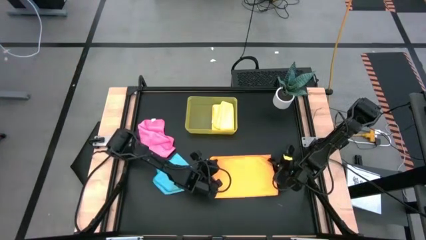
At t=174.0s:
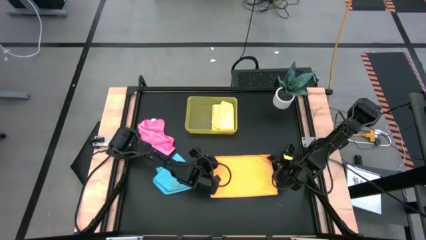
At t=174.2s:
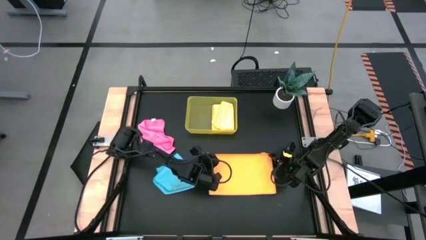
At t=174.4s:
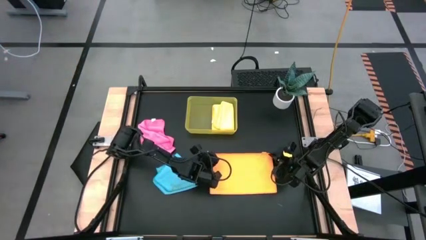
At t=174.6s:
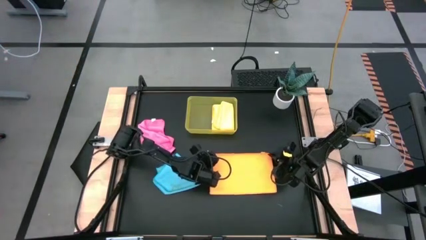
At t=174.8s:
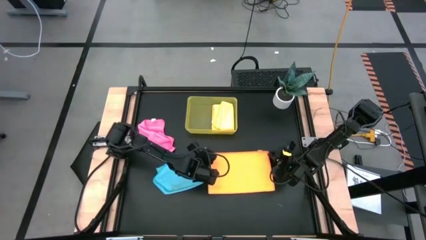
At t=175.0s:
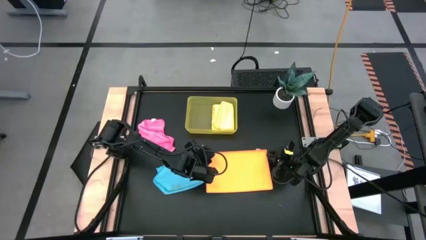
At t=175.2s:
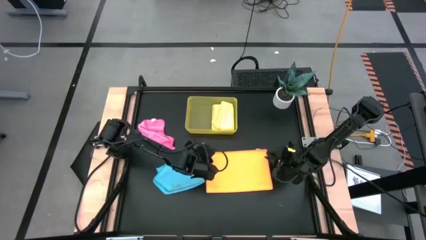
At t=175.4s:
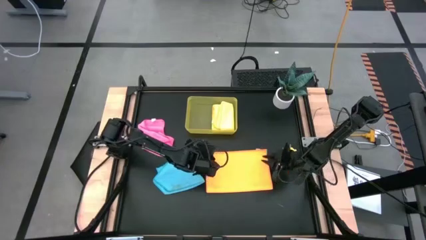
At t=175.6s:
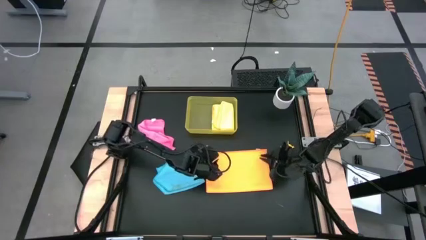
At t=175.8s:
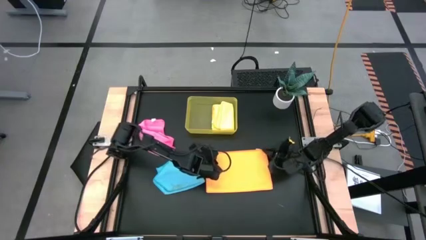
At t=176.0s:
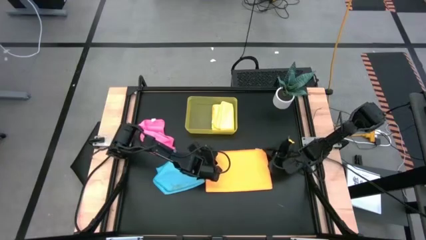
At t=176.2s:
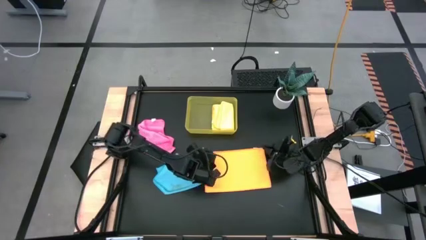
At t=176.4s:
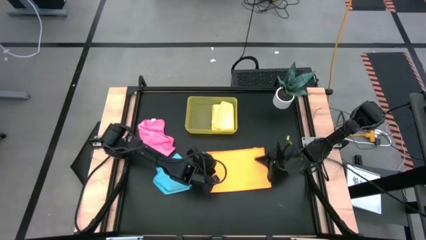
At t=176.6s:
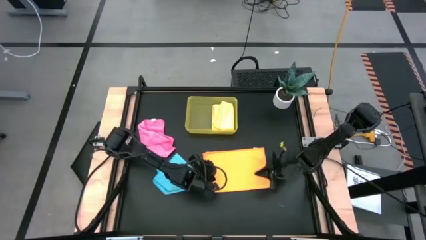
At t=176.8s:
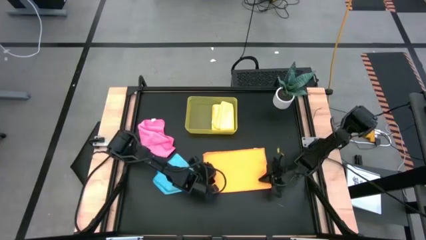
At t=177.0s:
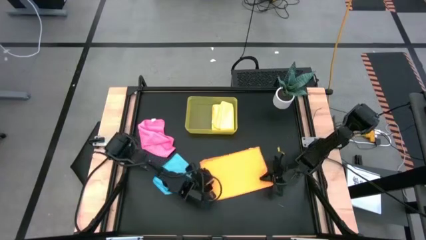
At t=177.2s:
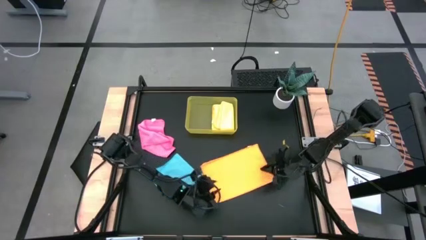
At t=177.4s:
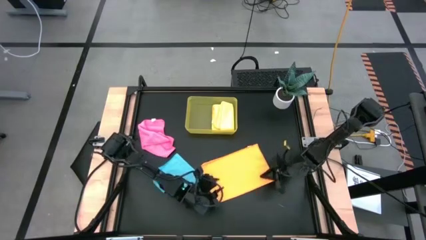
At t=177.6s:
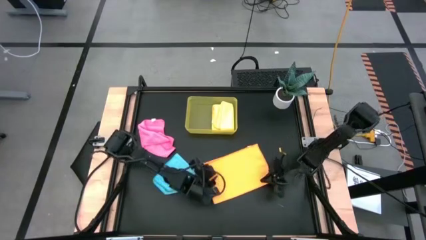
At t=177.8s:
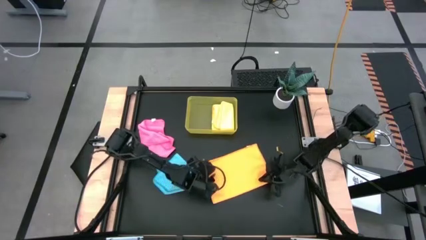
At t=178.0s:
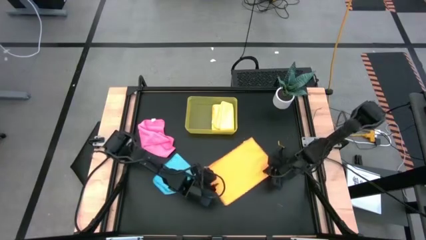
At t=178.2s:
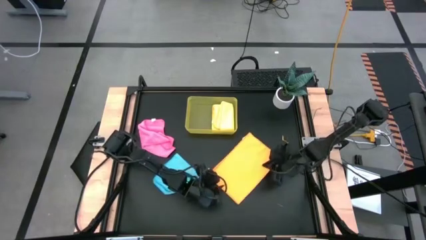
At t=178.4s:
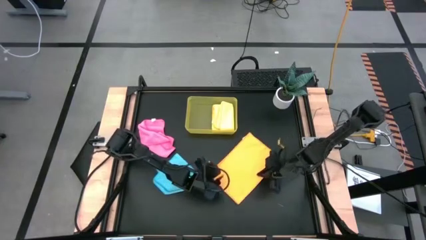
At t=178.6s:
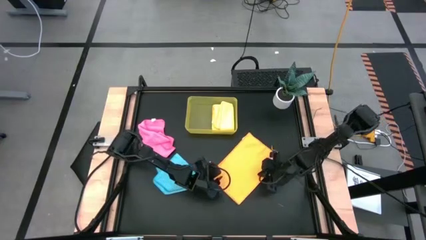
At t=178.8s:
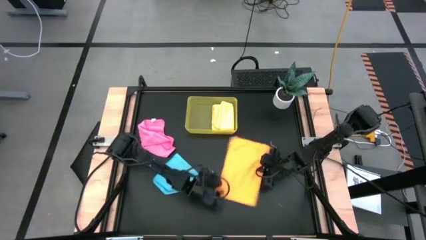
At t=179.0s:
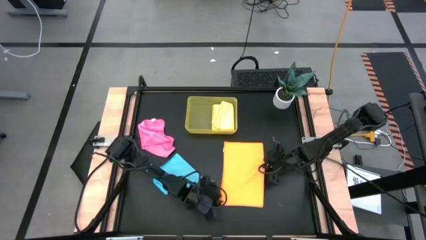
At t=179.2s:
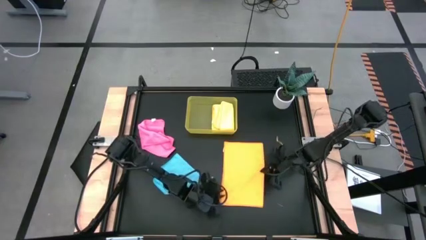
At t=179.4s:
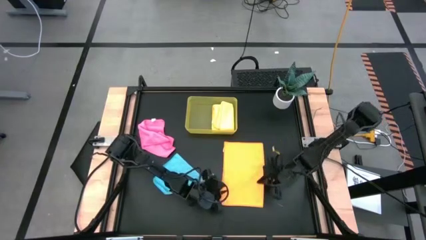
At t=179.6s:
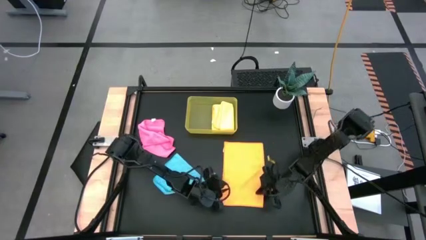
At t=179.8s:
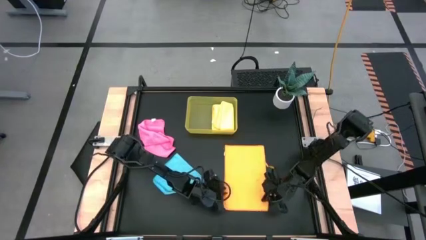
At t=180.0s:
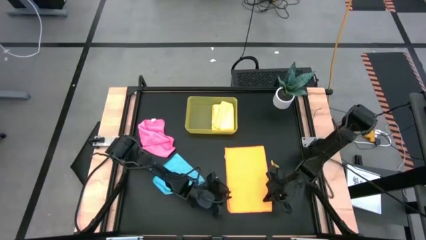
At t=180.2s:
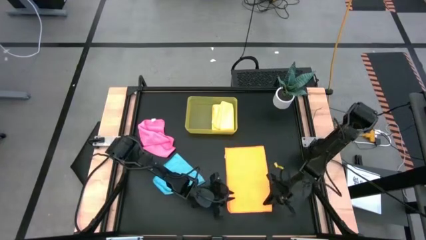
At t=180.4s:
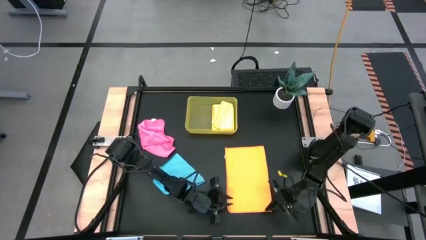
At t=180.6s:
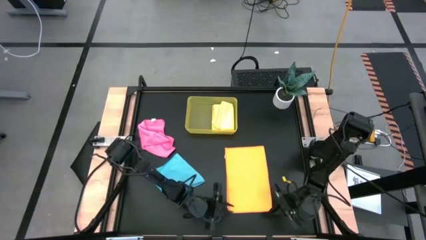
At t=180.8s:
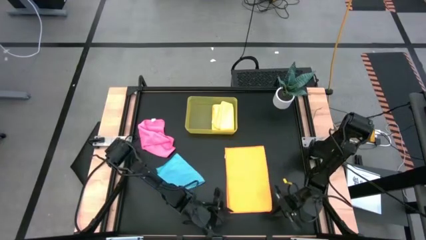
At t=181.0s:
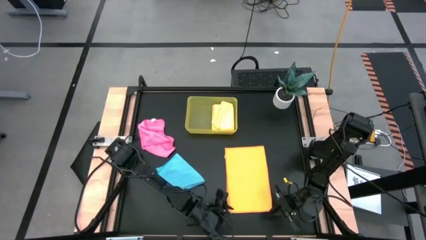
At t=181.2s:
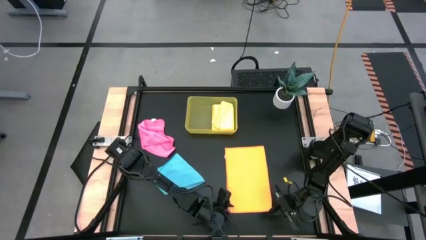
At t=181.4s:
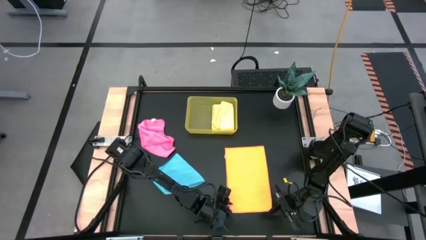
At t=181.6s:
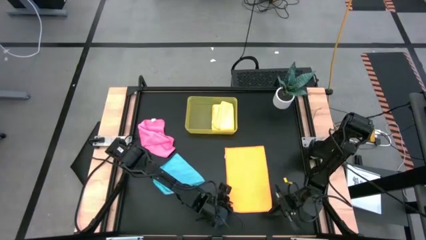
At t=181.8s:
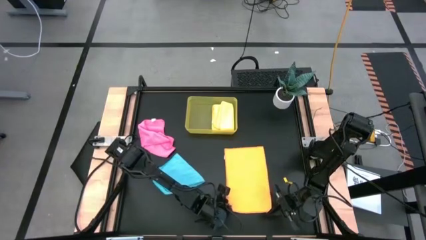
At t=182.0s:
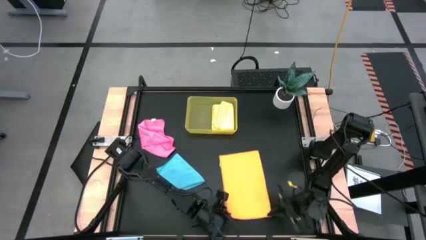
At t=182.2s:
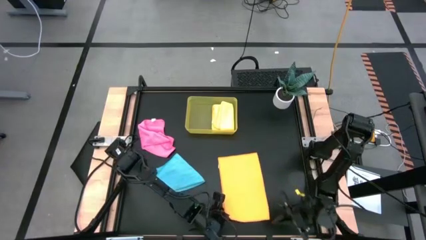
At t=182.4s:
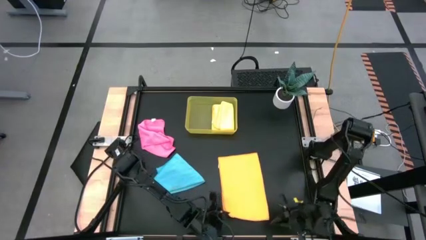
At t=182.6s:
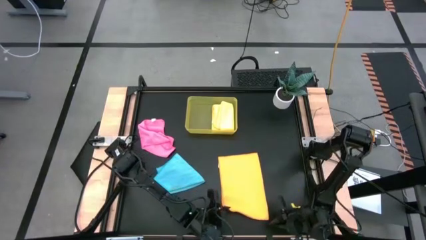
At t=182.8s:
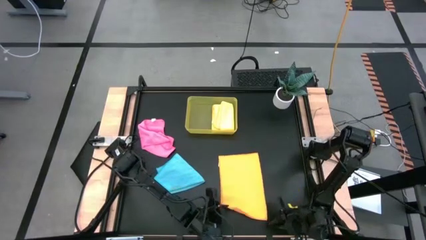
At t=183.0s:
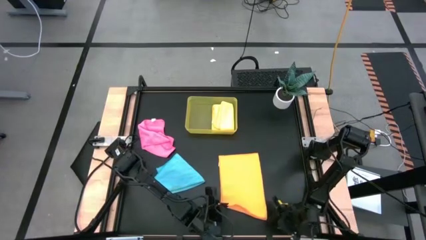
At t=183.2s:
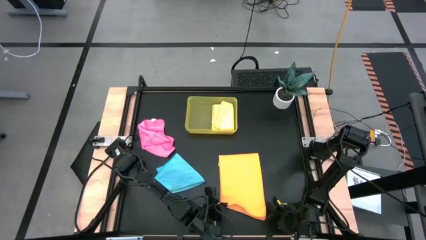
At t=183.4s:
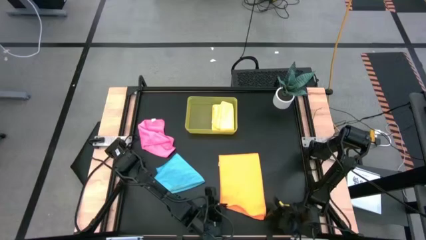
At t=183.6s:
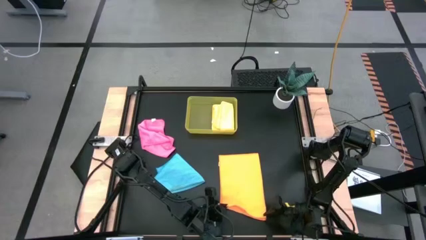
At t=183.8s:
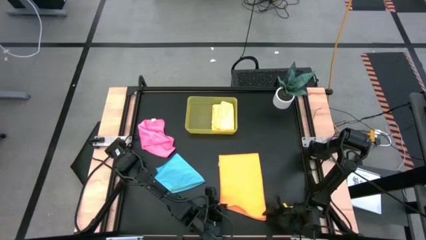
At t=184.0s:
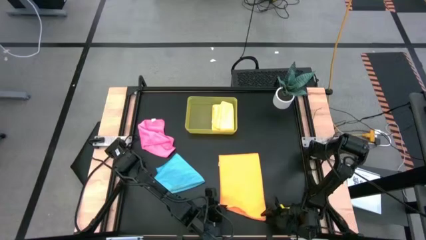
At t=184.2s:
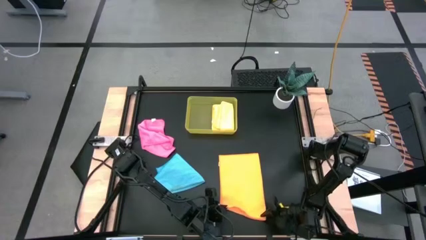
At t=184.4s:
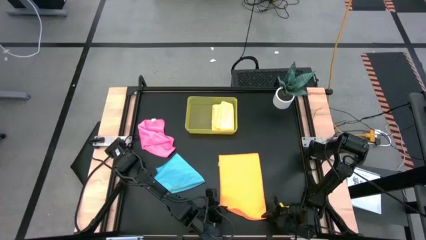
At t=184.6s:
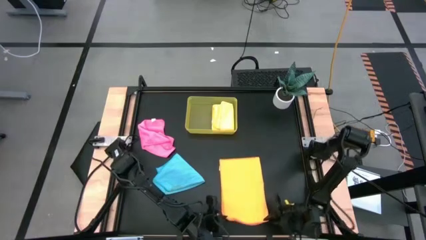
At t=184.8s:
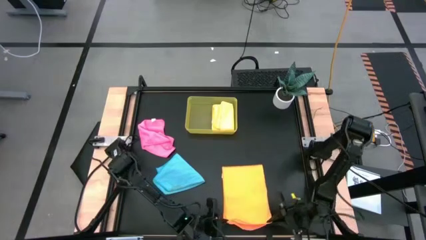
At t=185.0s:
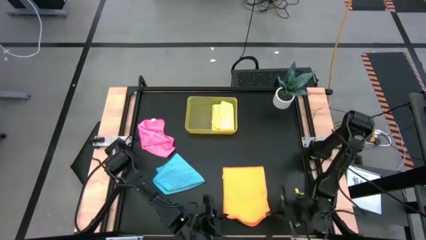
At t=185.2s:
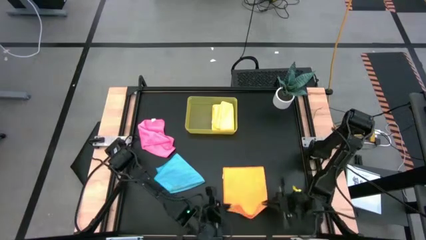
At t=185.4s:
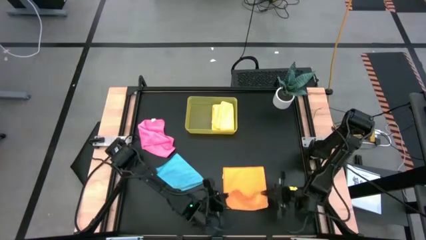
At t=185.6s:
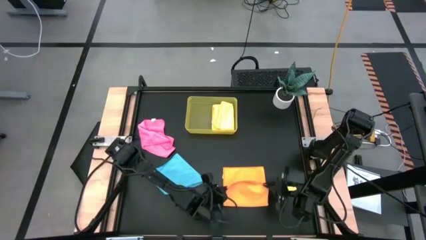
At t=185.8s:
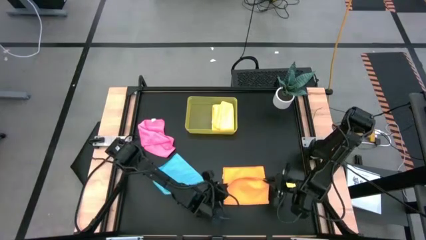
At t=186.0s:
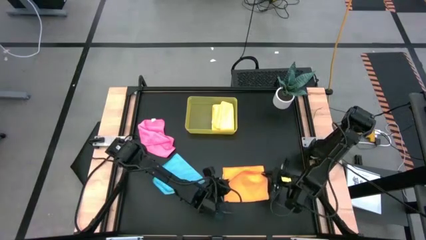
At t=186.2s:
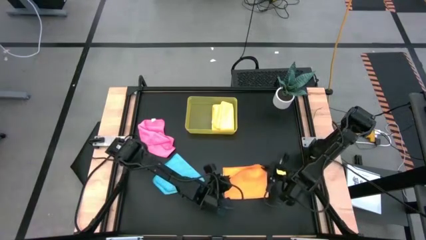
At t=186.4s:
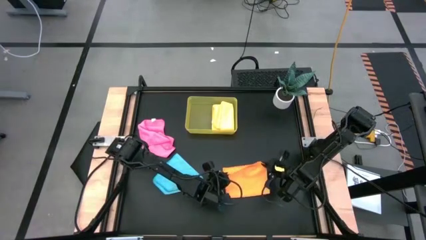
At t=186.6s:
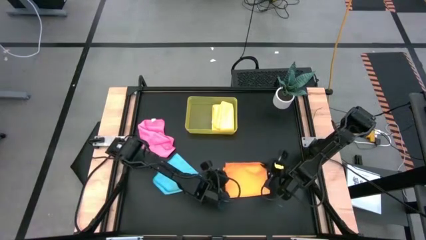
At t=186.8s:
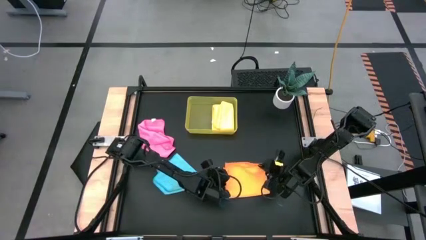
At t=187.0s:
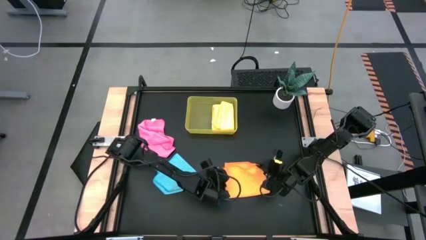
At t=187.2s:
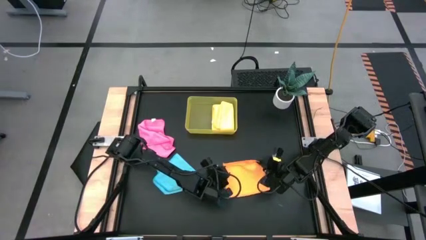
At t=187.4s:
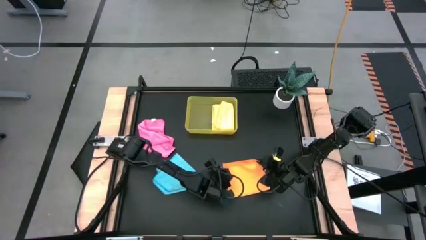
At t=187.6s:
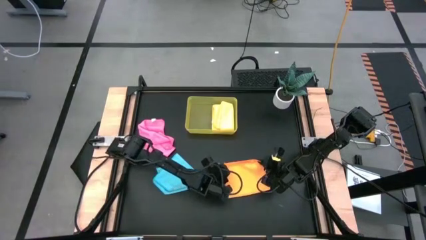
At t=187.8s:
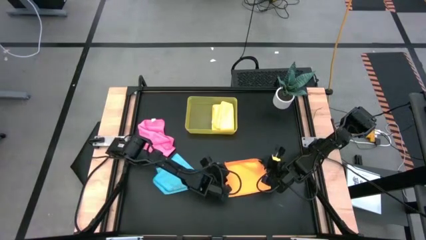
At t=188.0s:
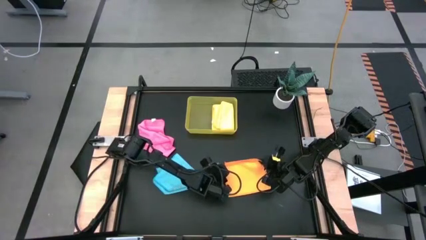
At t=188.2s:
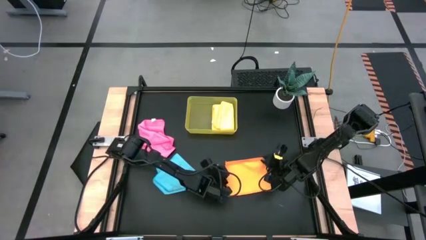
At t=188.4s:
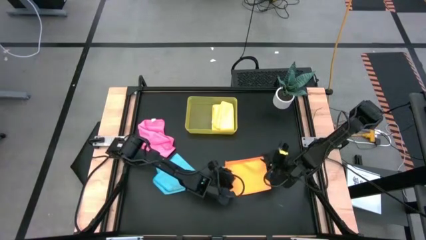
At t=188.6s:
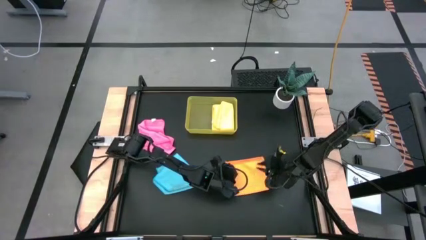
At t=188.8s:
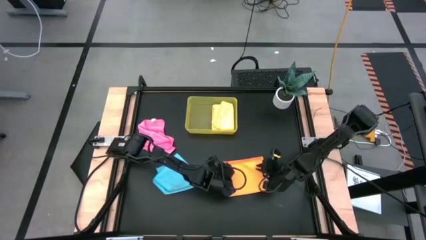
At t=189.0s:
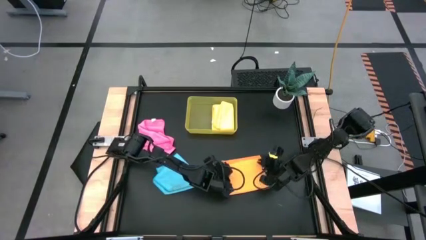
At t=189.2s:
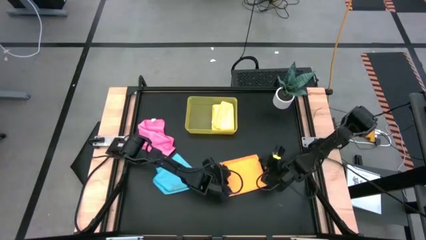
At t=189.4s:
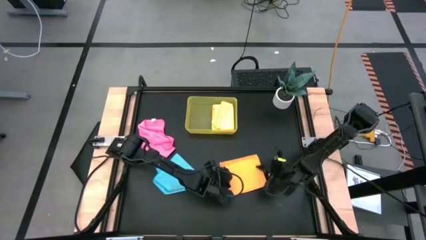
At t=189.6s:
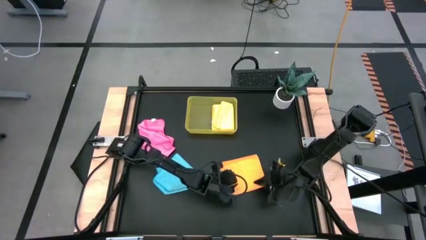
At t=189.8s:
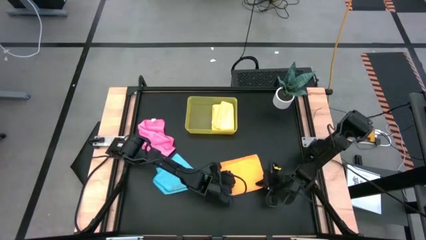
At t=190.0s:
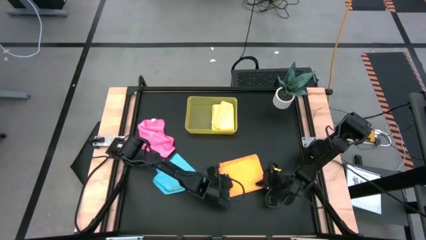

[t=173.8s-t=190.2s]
Task: Fold microfiber towels
Fold the orange microfiber cloth
